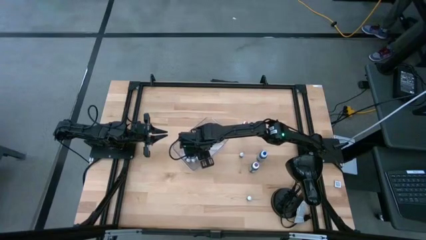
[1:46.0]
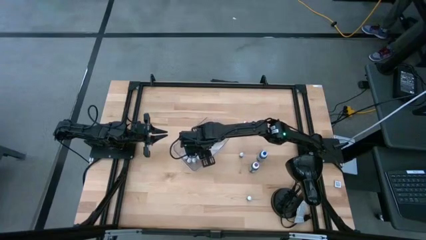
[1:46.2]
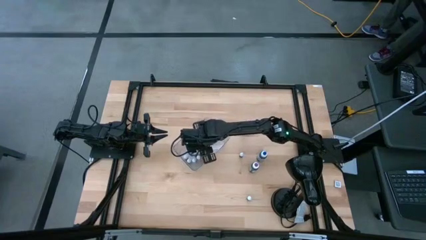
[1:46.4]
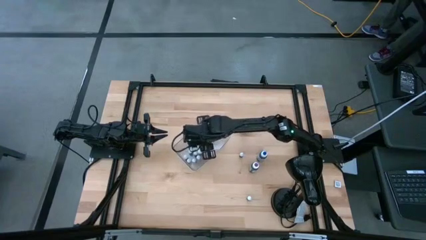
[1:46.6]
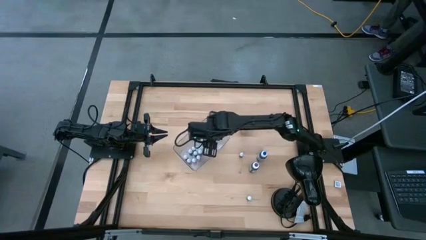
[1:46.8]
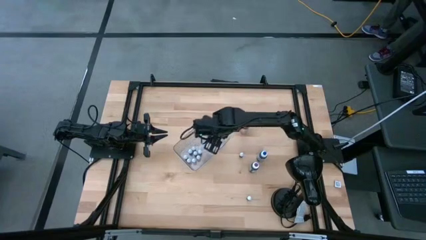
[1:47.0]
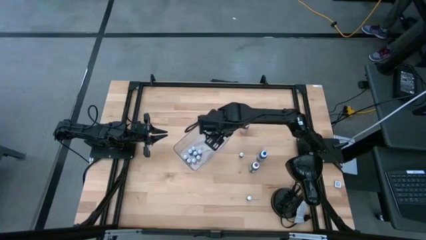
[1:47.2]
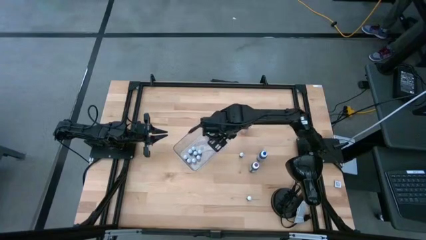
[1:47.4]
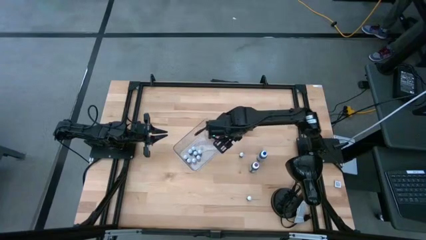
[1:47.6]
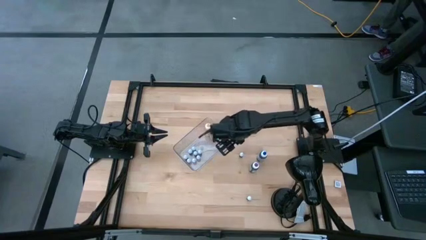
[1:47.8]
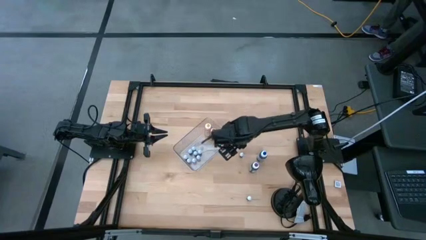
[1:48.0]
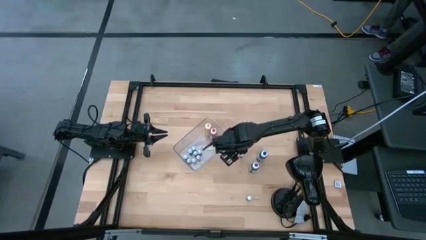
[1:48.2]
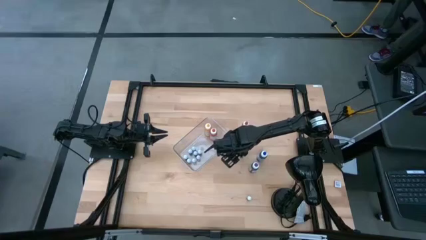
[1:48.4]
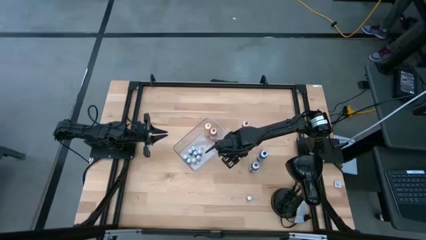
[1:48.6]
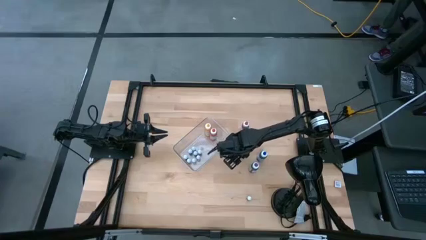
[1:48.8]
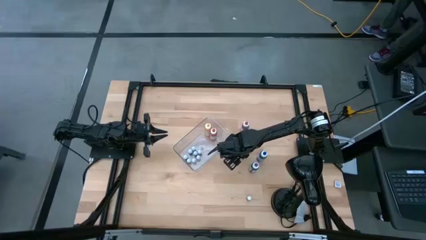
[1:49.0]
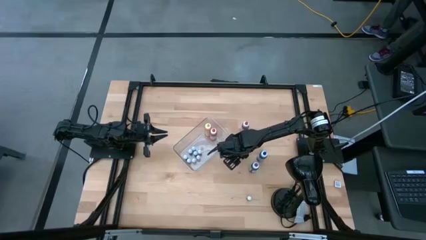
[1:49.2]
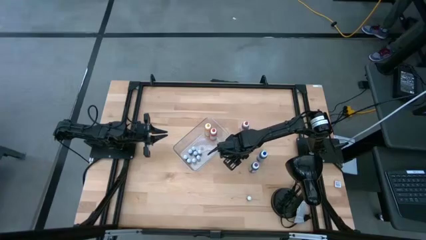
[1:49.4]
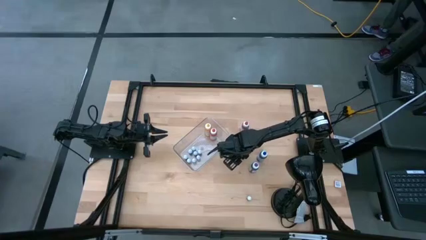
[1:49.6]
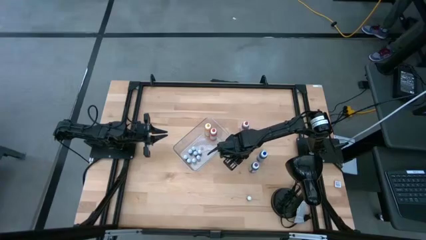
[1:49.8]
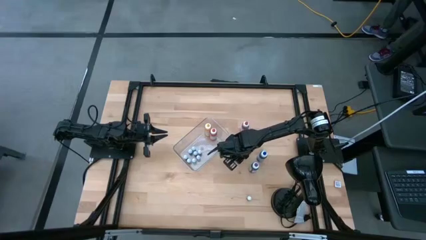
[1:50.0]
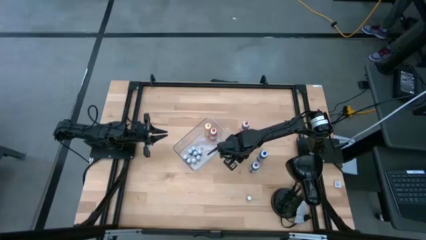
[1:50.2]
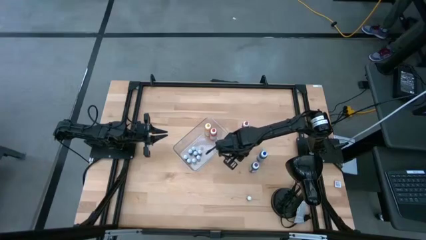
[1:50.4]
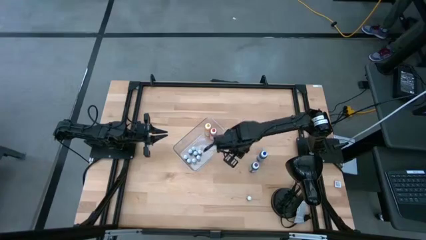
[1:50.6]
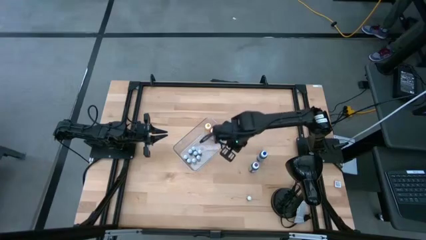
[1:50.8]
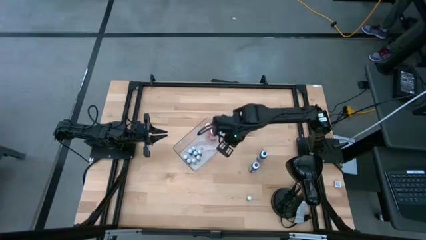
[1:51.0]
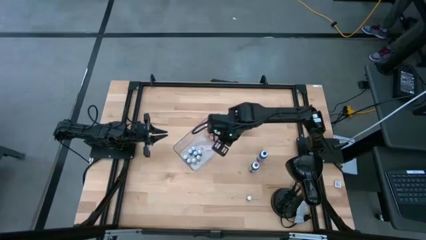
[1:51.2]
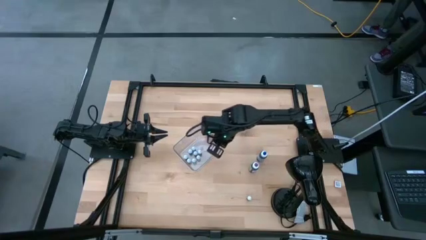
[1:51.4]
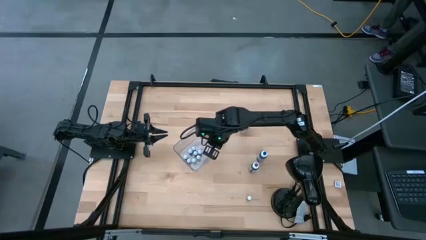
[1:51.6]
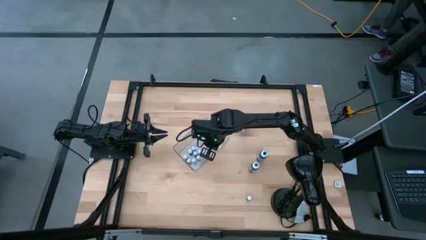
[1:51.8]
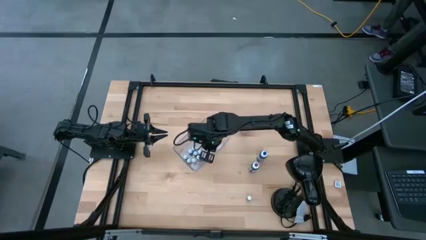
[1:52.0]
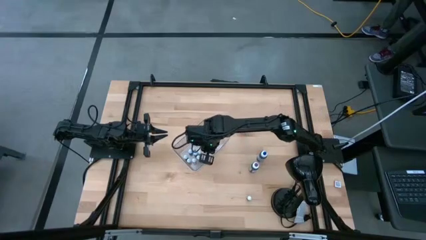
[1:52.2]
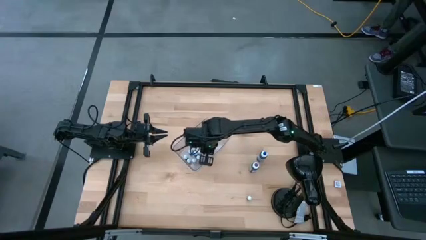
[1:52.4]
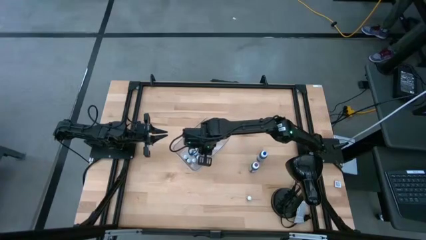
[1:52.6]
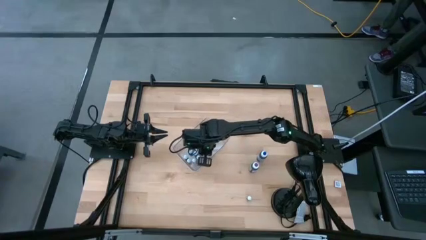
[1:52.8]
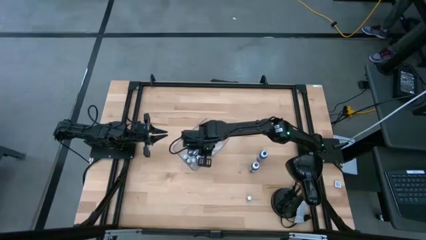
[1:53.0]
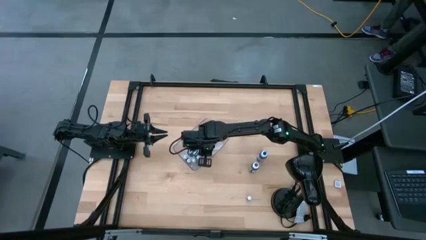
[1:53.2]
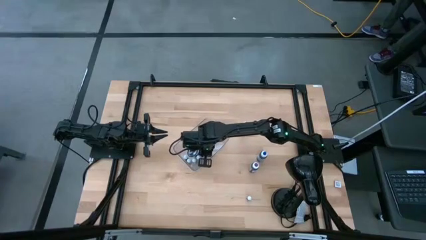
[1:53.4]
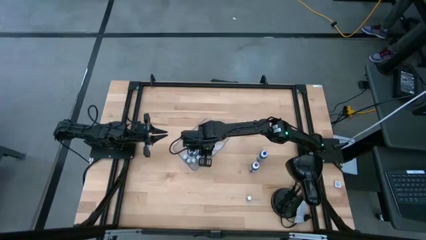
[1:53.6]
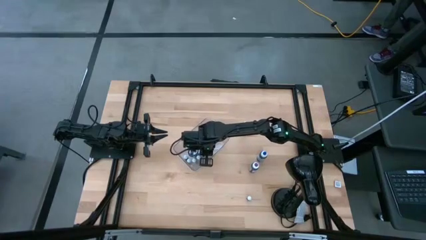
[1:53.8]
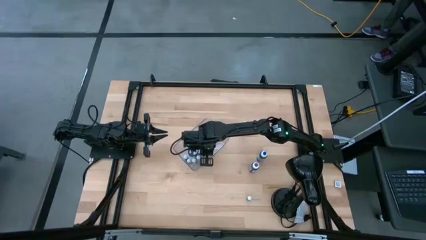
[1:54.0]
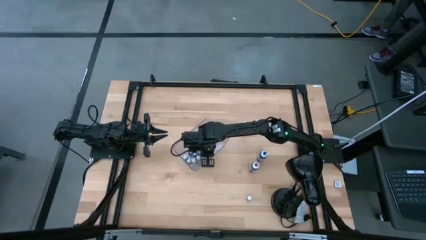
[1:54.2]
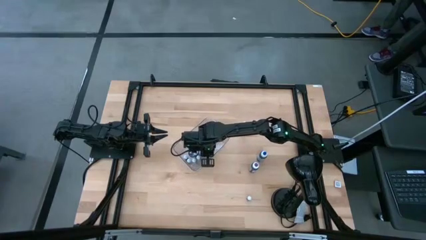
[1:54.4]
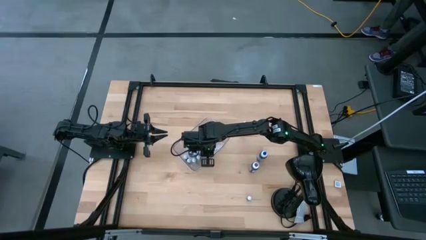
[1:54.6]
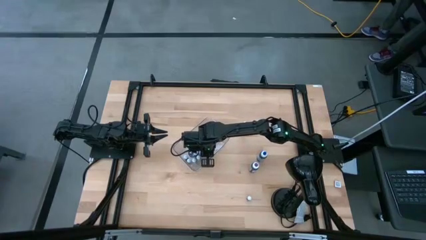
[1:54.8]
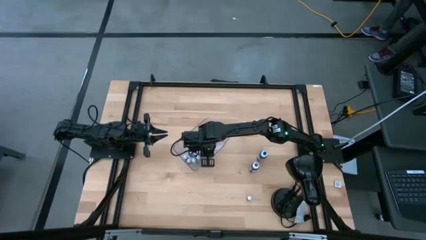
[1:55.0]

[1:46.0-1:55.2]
Task: Pick & Place food coloring
Put the small white food coloring bottle into the transparent bin

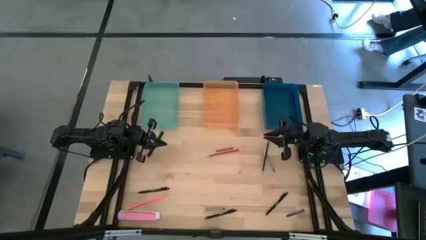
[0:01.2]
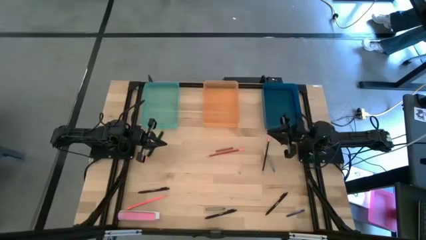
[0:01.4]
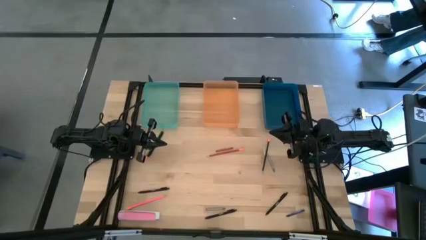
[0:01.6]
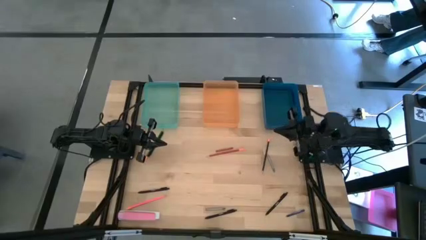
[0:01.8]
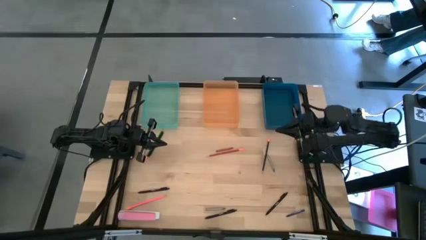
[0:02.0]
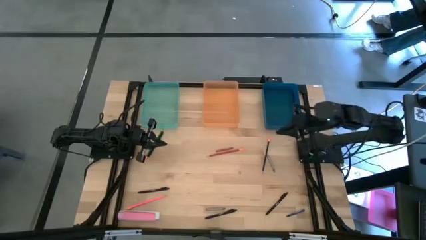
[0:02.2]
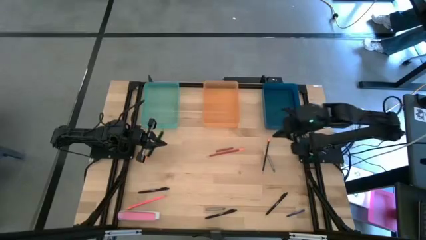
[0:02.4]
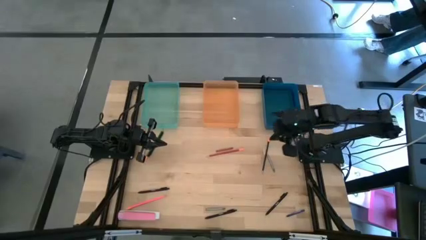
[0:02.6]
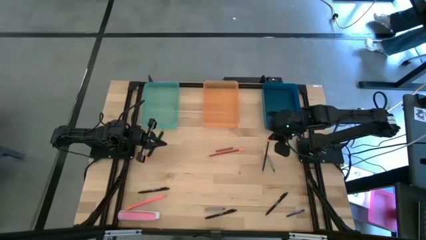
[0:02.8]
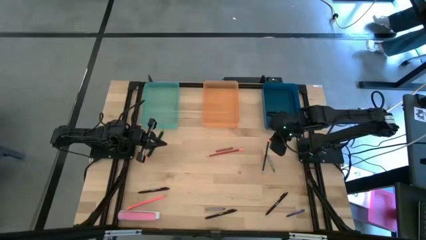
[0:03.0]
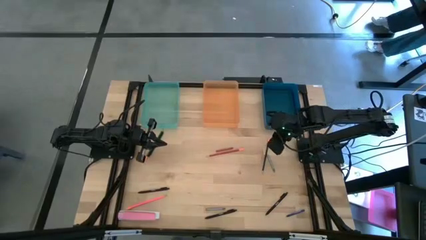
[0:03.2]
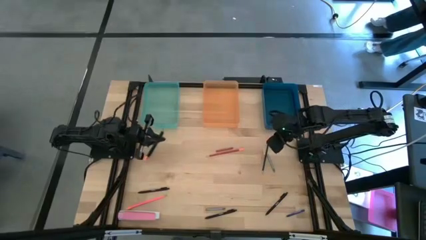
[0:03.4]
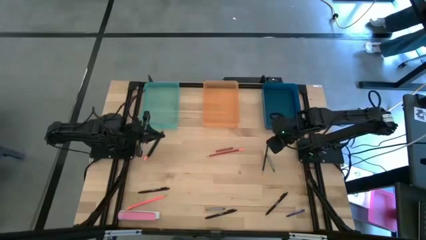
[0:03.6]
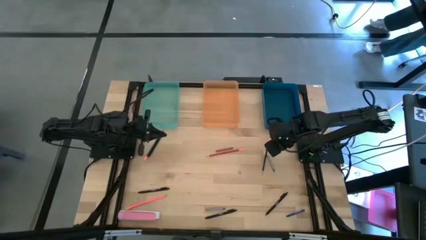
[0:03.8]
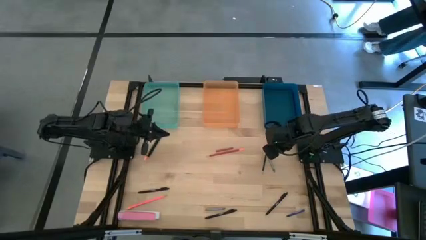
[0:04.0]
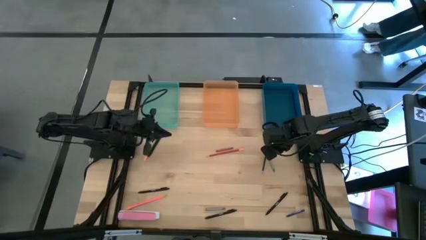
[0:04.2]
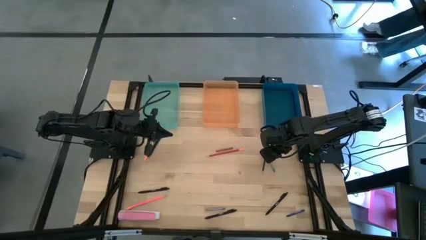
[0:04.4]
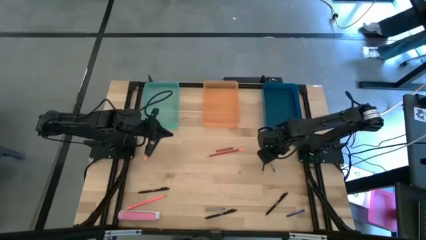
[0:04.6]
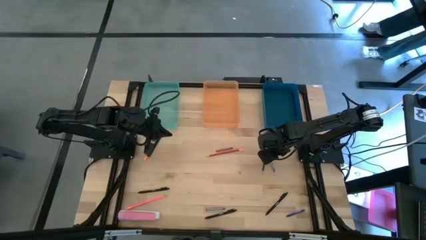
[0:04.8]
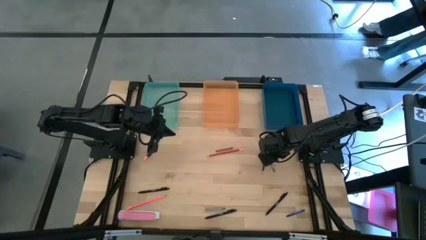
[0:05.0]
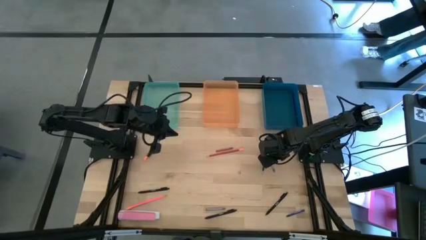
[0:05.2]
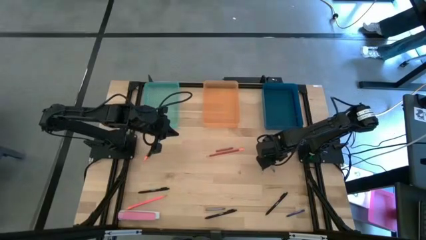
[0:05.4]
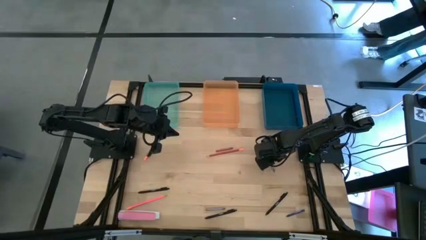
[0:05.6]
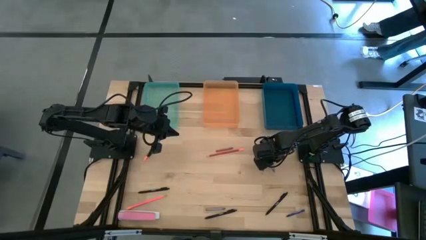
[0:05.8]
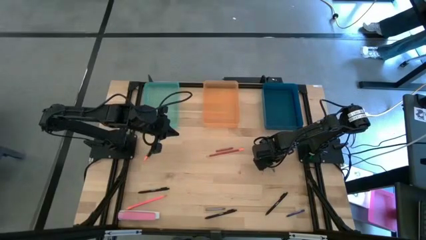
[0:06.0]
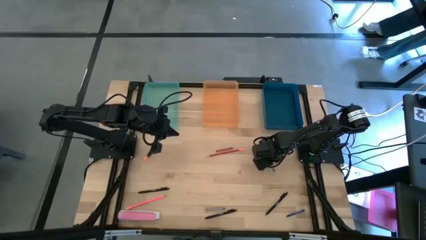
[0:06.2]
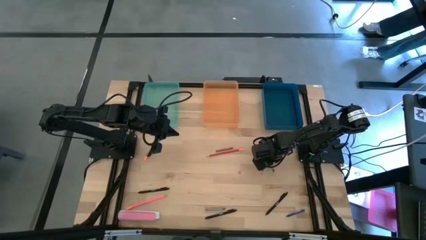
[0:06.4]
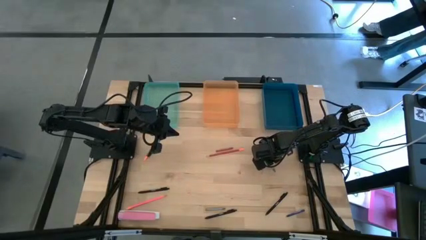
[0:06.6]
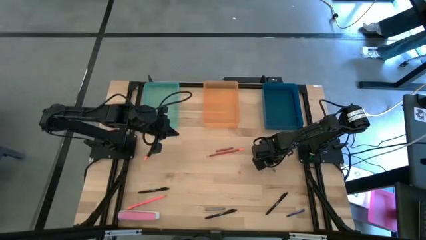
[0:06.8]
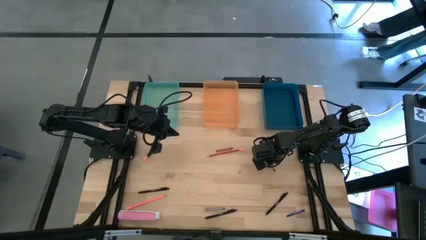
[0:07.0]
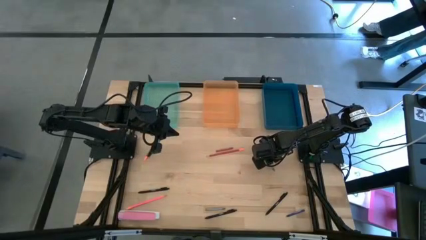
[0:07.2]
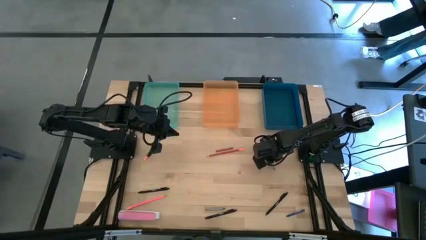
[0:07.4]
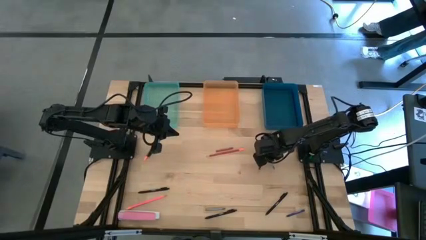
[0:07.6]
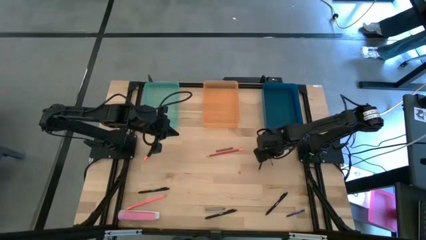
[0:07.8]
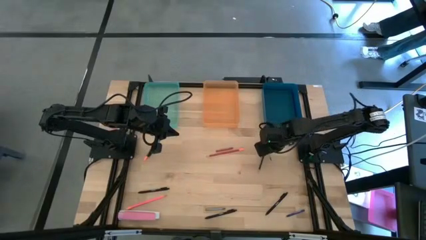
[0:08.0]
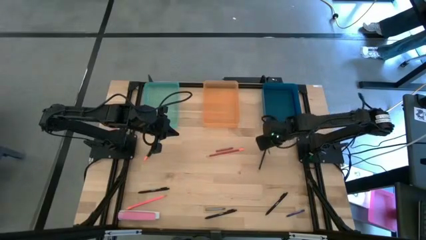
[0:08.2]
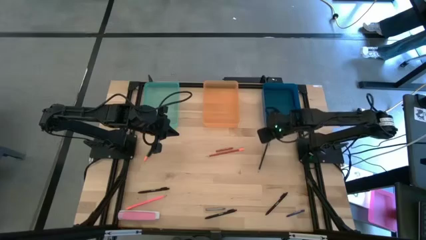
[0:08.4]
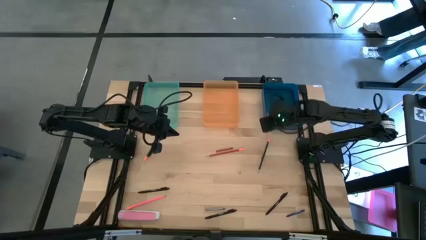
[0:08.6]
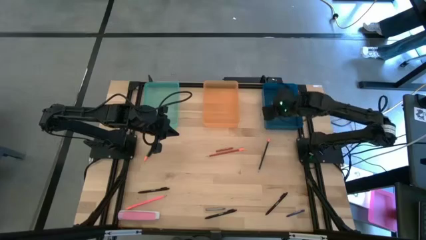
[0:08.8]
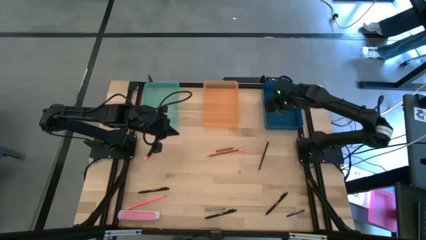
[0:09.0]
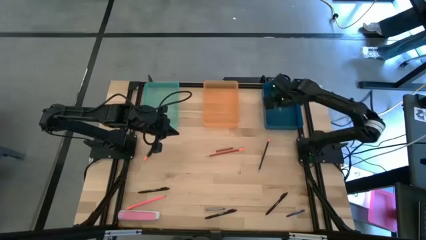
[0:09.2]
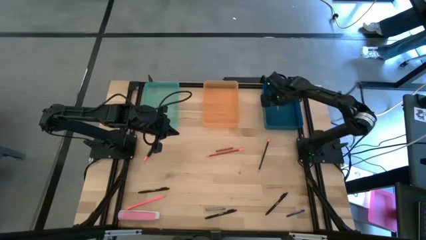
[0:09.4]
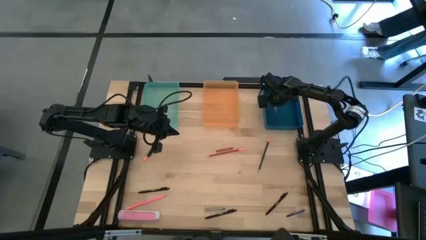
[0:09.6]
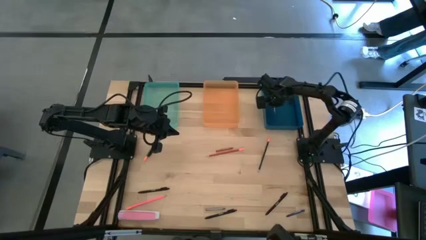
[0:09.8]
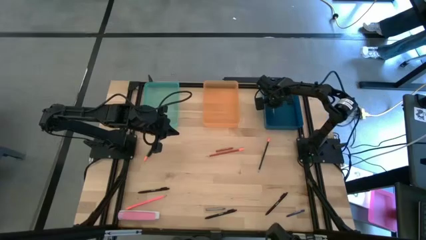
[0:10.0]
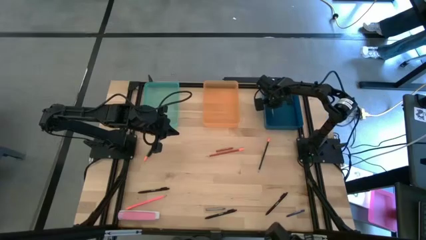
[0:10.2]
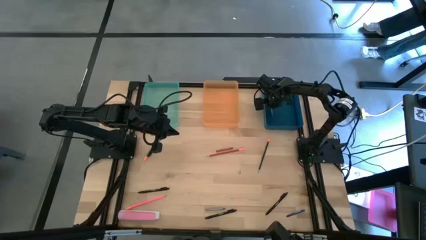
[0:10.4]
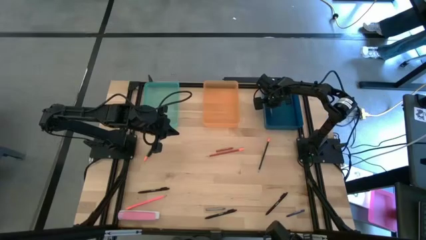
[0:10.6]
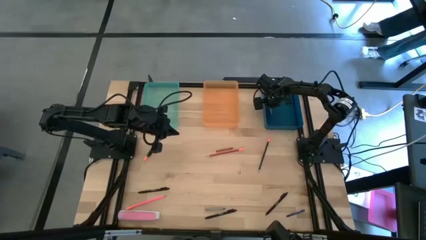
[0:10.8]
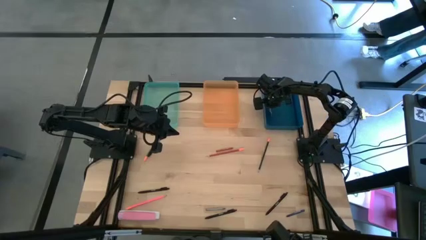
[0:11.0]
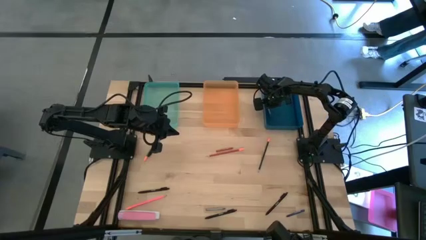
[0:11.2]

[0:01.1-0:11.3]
Task: Sort crayons/erasers/pens/pencils in bins
Put the light blue crayon into the blue bin
